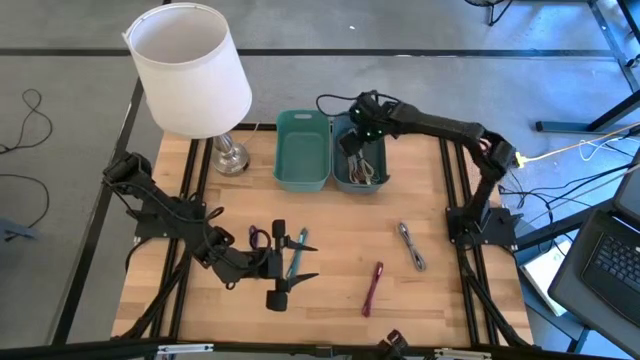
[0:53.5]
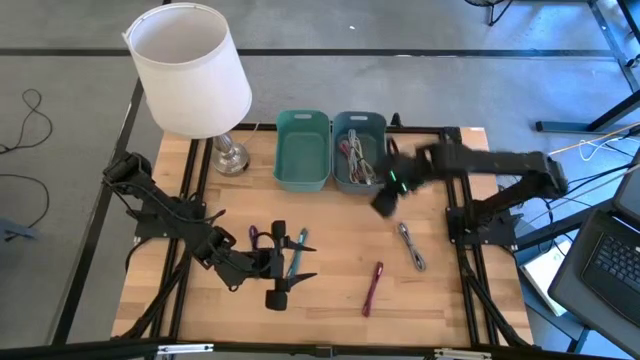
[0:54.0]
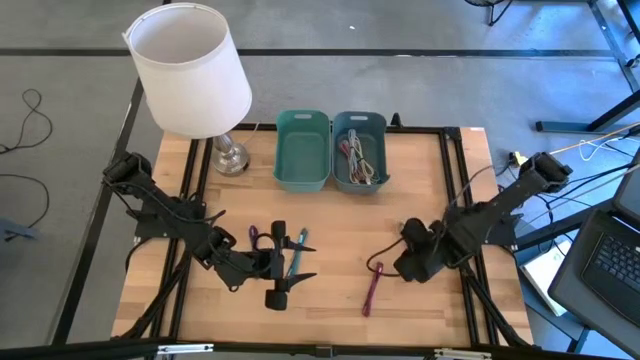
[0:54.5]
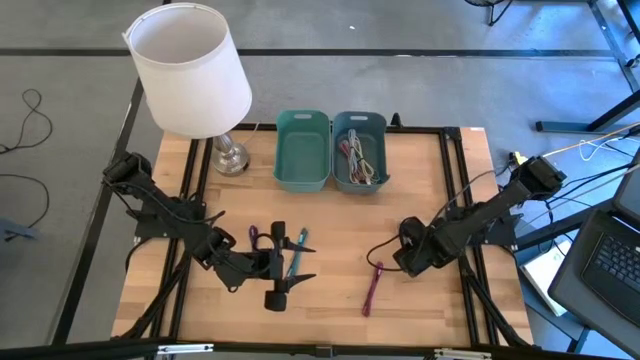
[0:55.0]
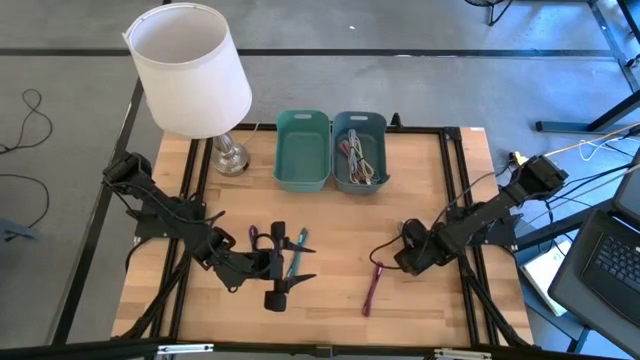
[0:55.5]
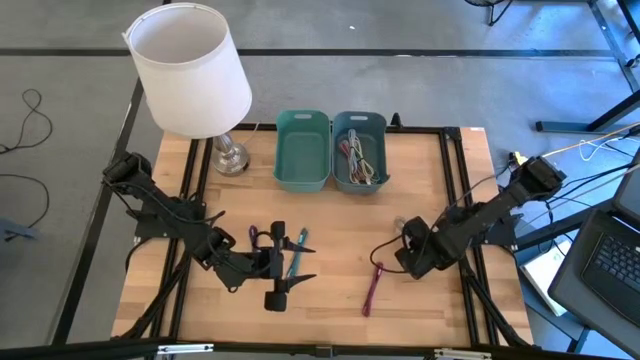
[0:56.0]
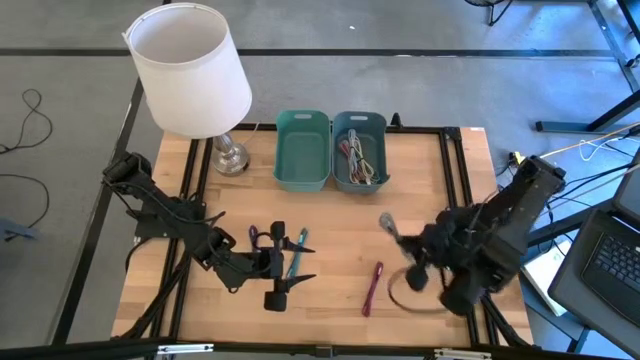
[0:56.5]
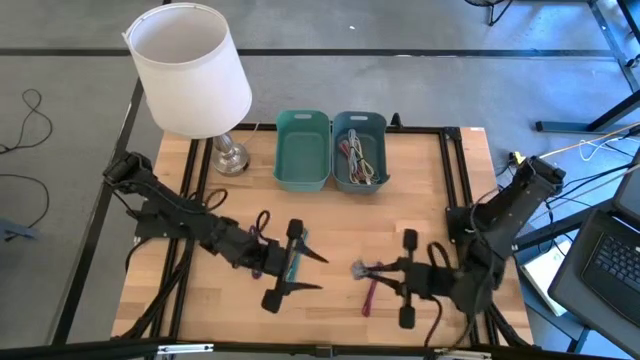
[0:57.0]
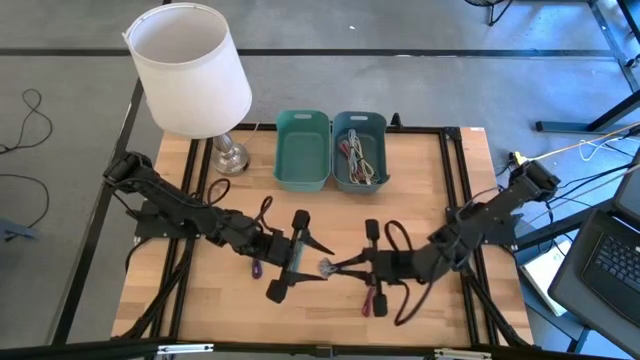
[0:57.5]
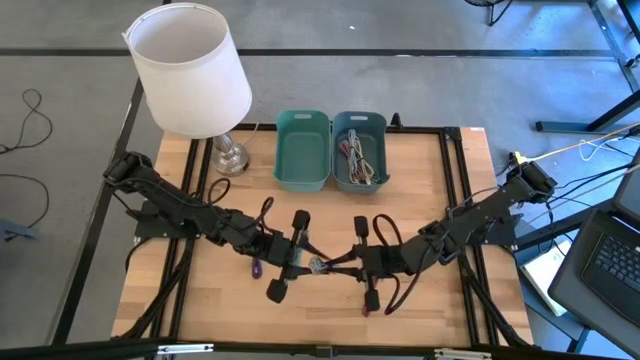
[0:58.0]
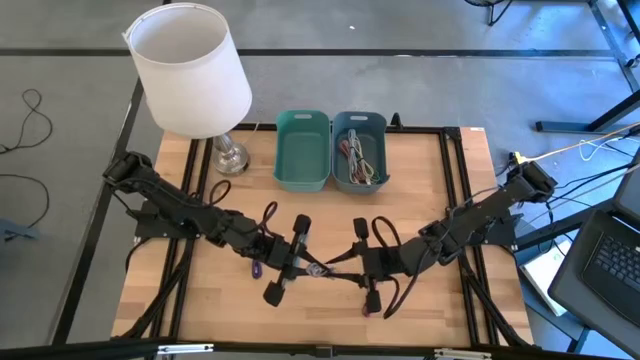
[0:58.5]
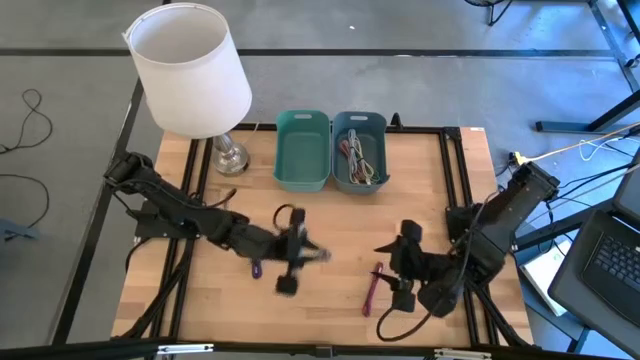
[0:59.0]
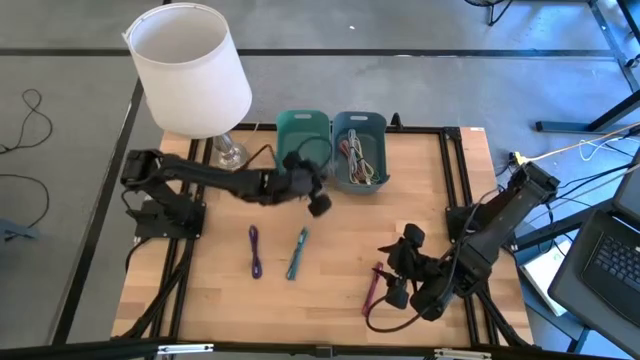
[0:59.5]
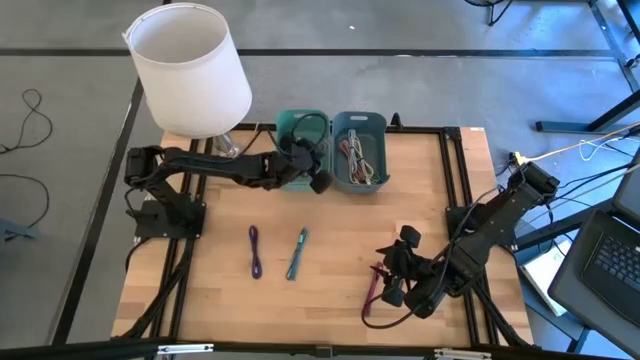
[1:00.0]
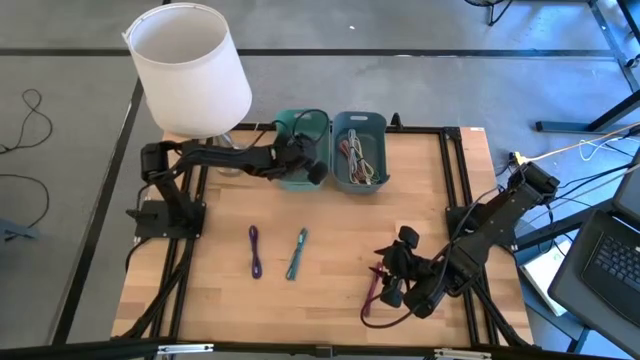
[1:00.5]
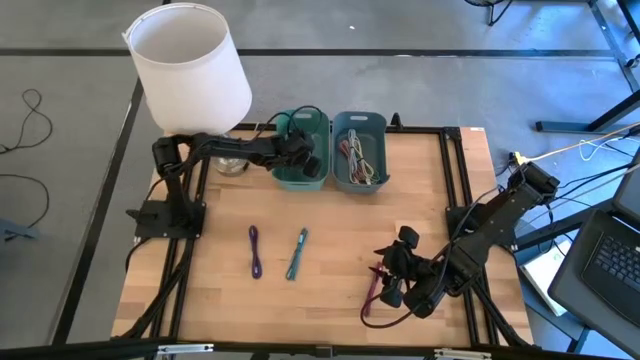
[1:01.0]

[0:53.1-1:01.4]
Put the white and black charger cable into the green bin

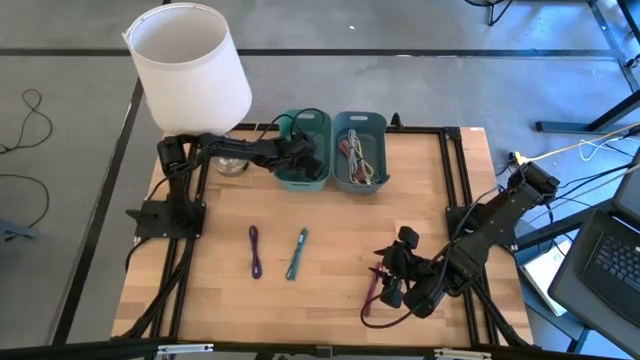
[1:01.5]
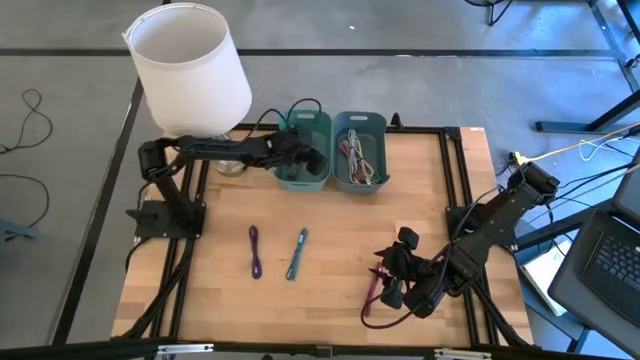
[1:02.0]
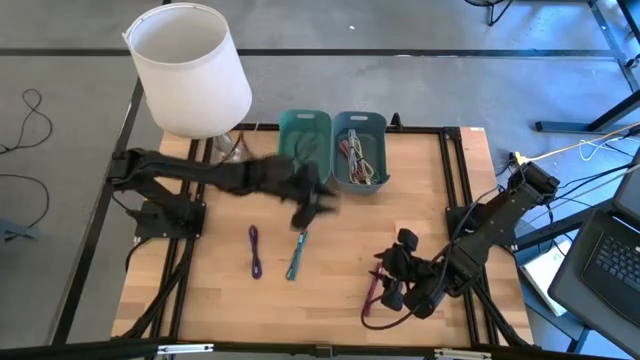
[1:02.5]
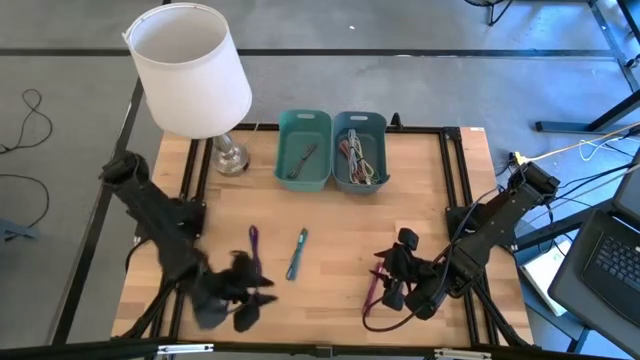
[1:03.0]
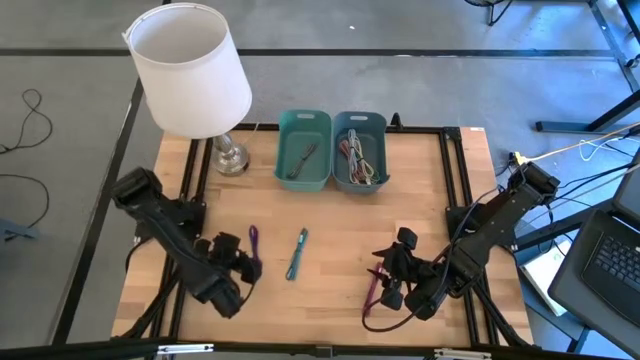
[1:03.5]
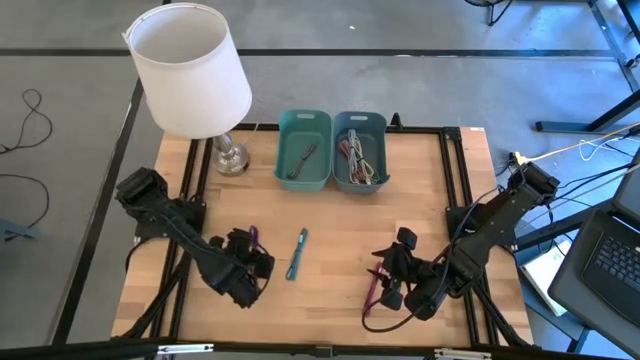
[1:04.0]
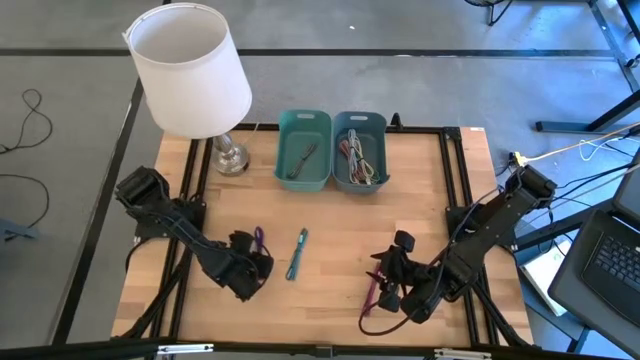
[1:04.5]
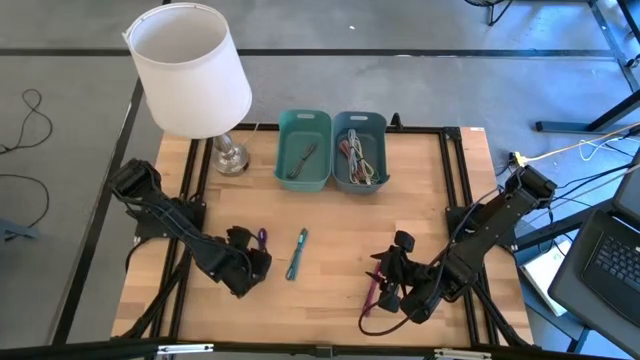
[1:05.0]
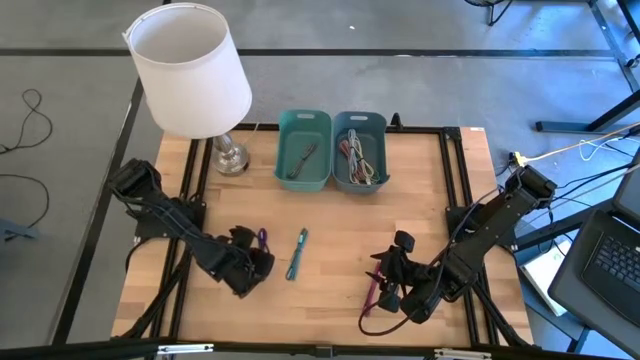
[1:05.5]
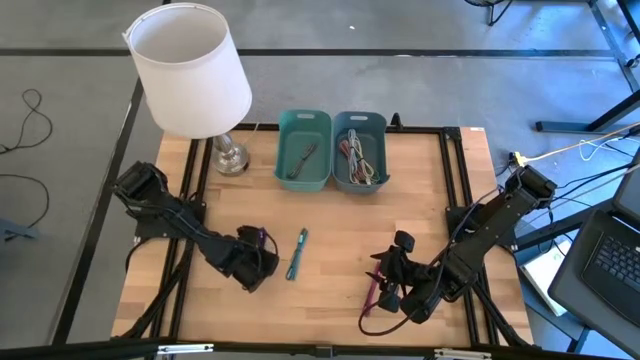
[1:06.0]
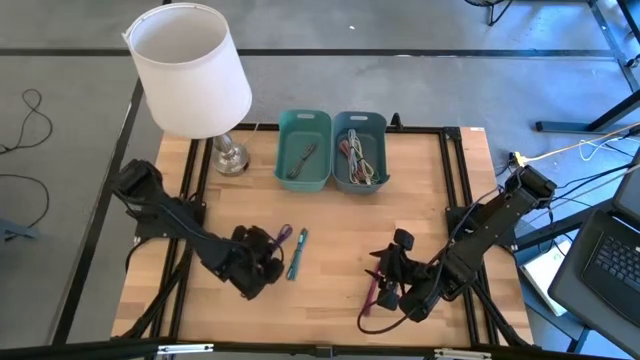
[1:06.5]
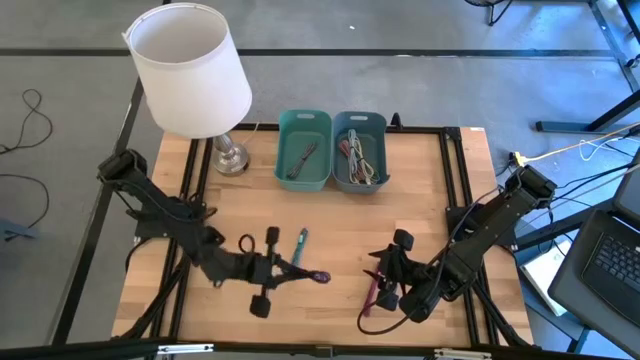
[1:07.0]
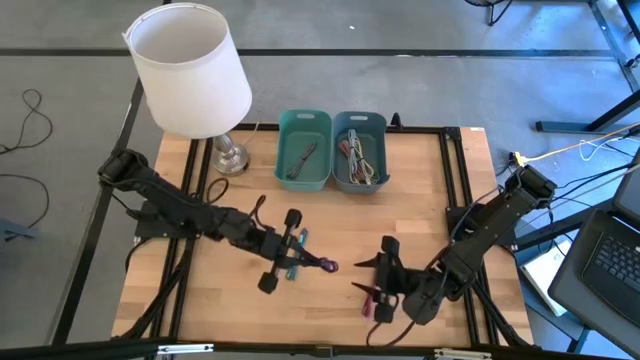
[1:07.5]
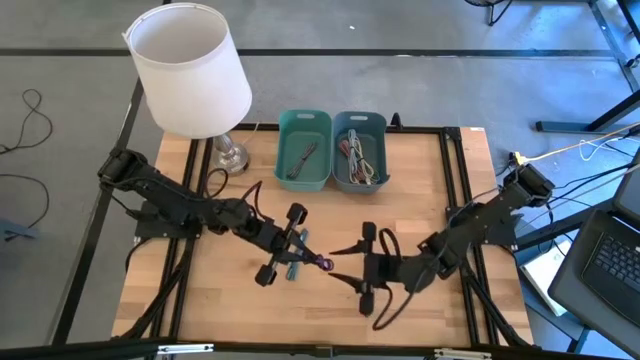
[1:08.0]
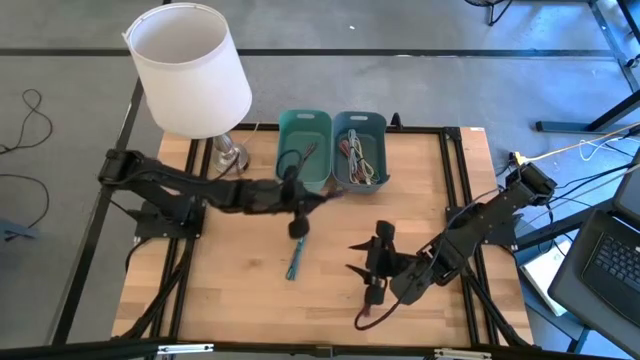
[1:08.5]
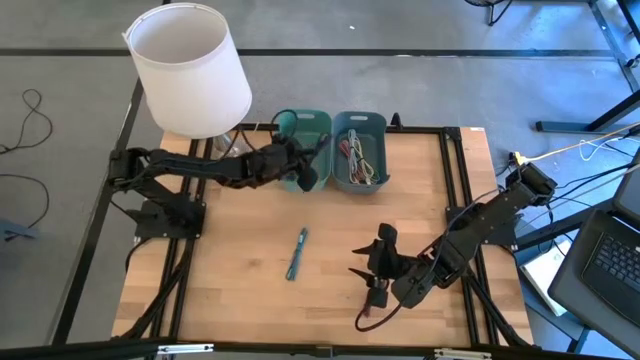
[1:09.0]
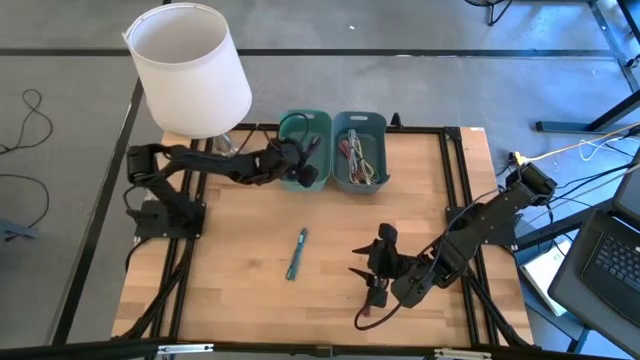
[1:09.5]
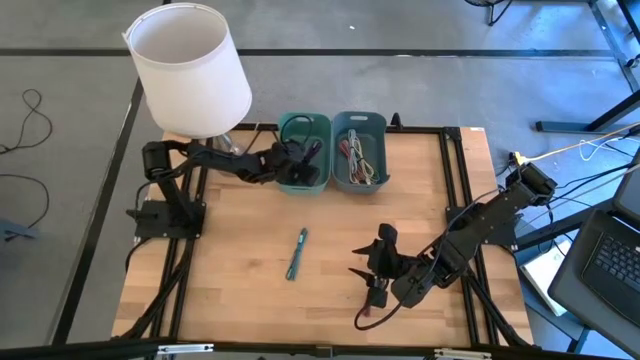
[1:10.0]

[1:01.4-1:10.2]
Put the violet and black charger cable into the green bin

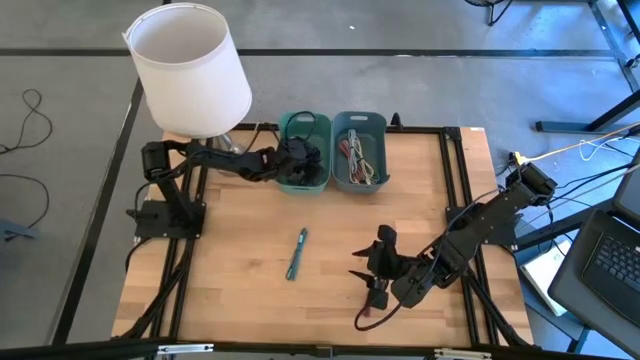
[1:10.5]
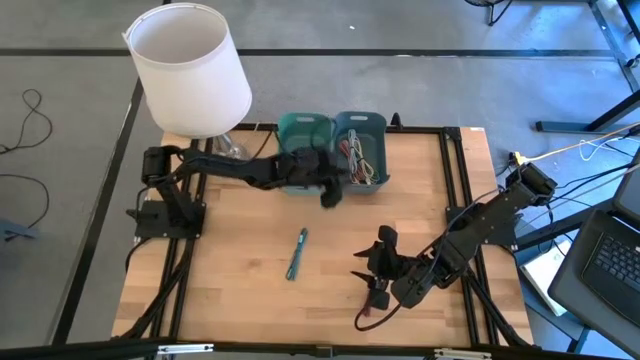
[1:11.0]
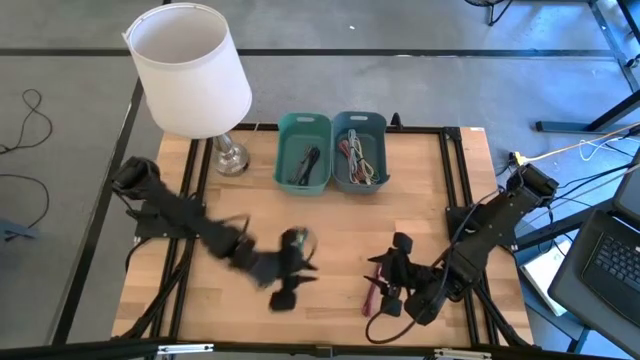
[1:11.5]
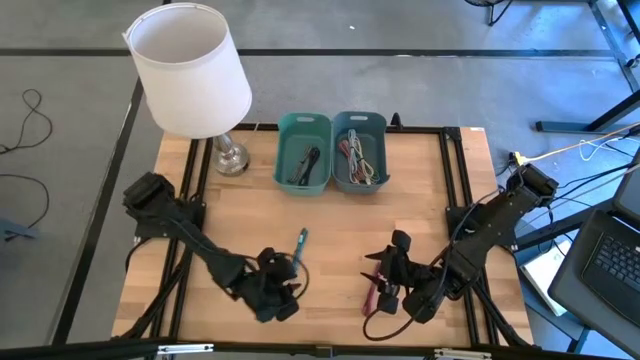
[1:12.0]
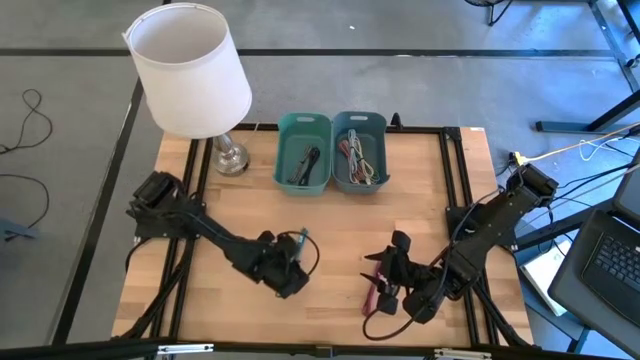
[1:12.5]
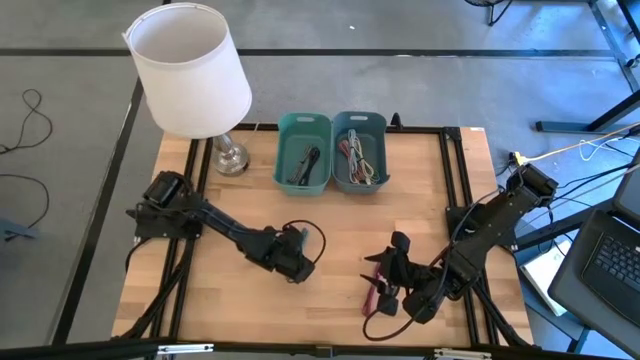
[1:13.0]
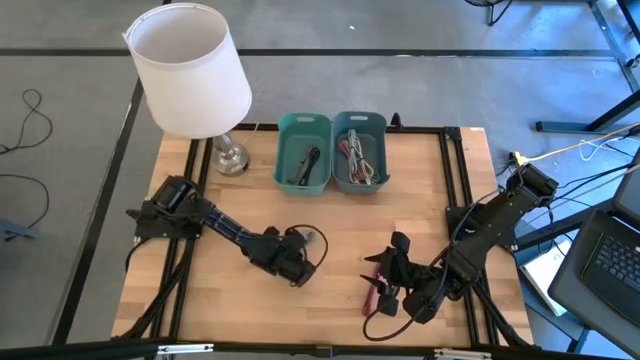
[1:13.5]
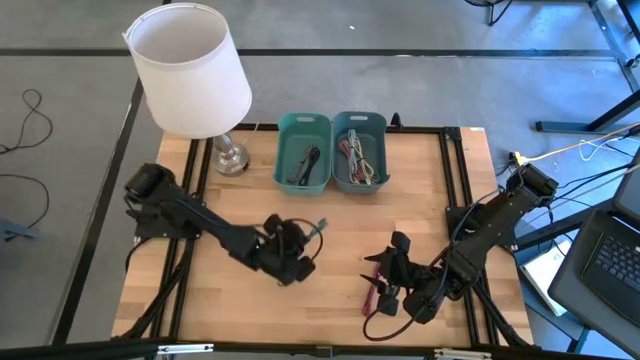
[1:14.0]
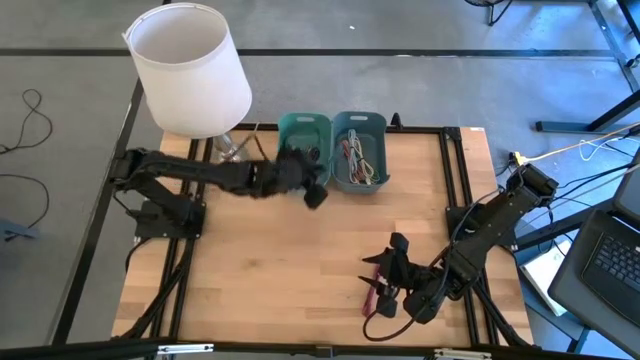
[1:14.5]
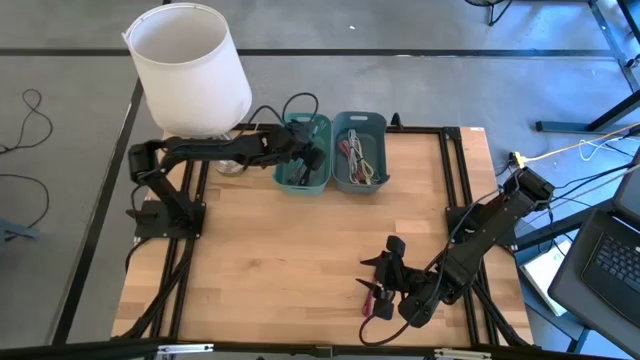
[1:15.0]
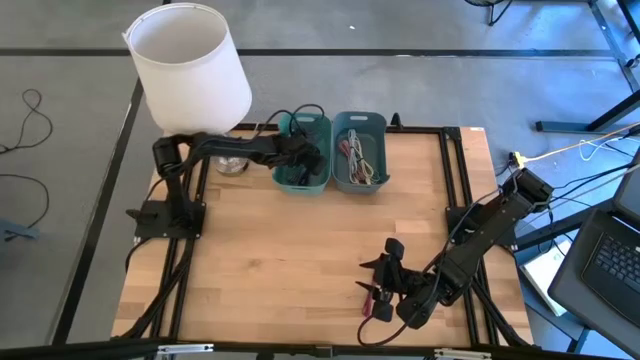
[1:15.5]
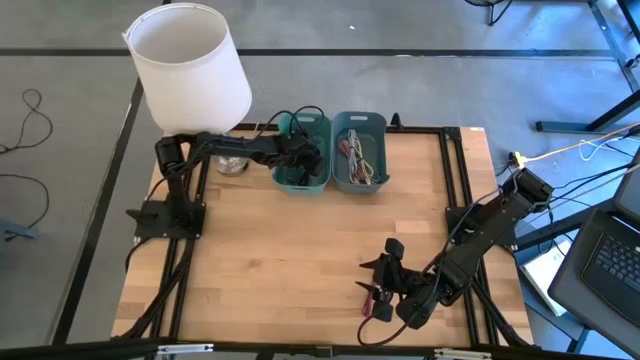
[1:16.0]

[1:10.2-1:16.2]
Put the blue and black charger cable into the green bin
